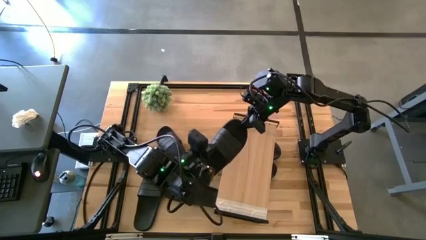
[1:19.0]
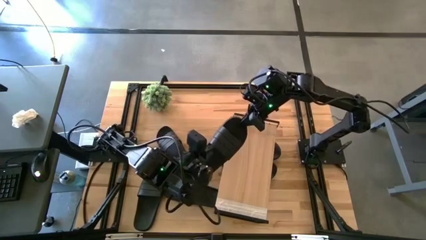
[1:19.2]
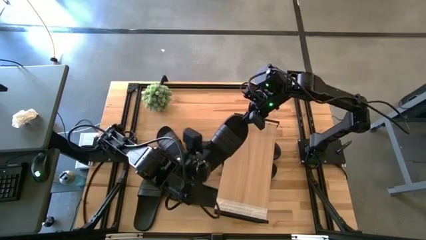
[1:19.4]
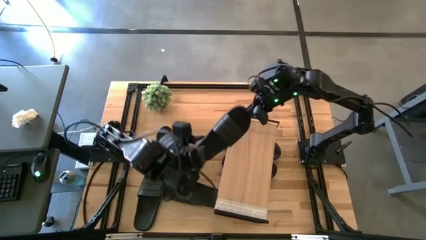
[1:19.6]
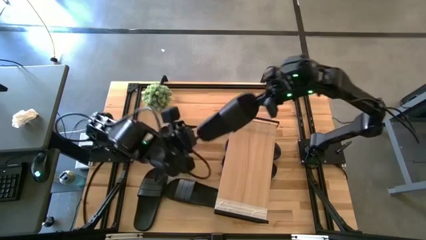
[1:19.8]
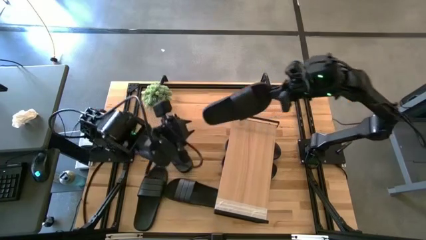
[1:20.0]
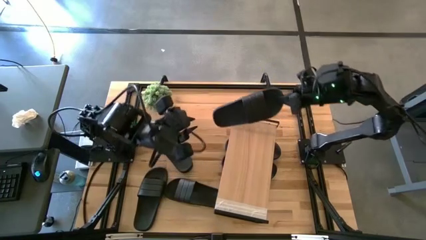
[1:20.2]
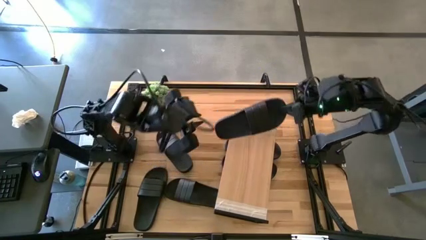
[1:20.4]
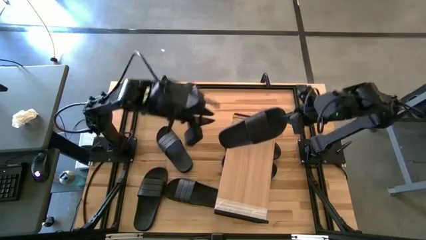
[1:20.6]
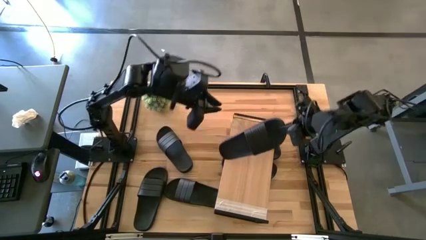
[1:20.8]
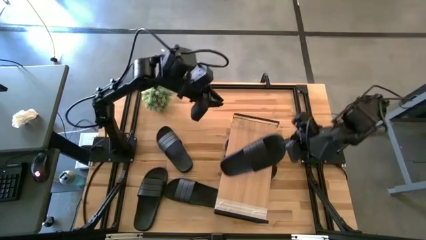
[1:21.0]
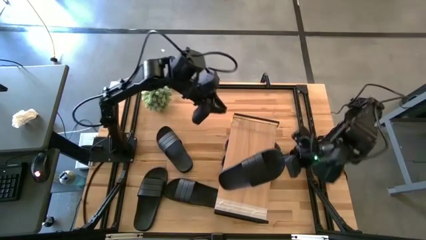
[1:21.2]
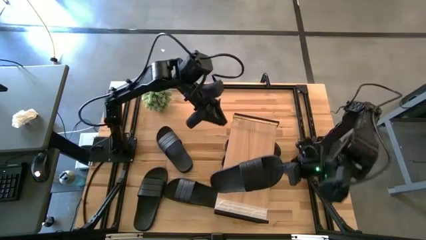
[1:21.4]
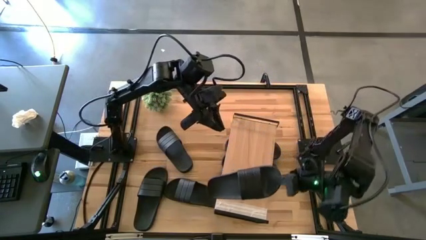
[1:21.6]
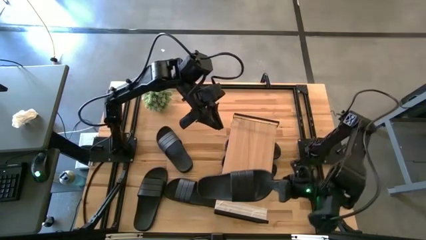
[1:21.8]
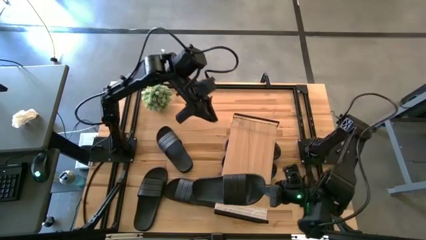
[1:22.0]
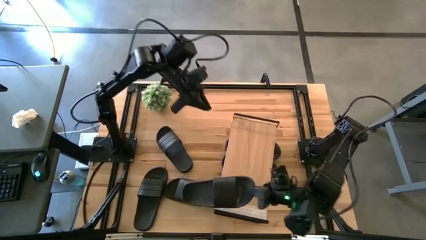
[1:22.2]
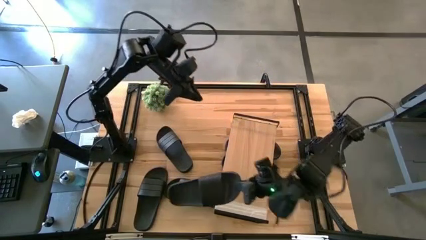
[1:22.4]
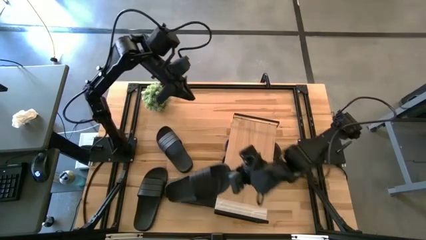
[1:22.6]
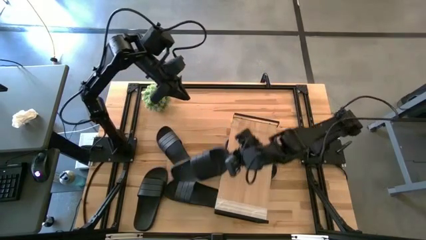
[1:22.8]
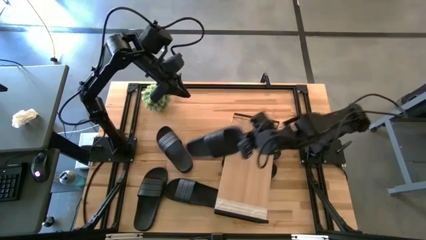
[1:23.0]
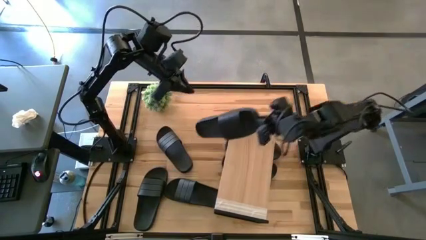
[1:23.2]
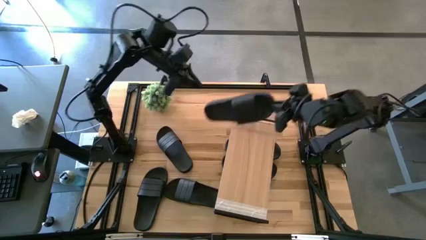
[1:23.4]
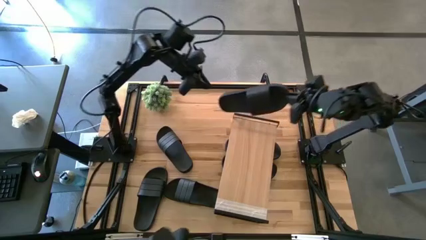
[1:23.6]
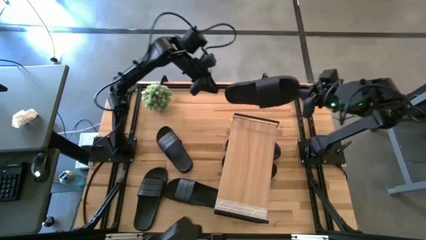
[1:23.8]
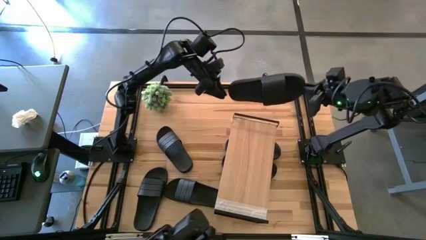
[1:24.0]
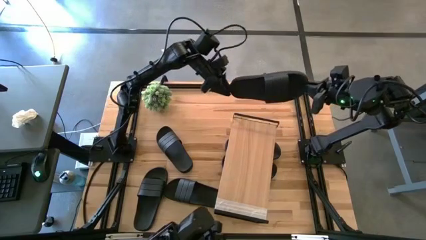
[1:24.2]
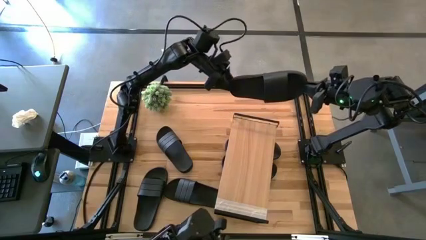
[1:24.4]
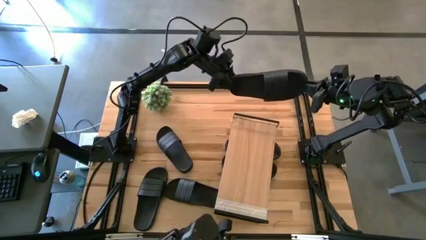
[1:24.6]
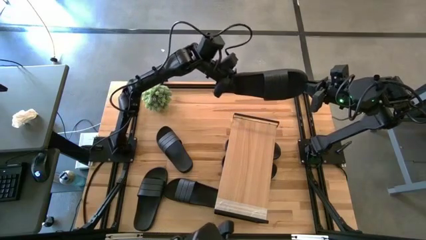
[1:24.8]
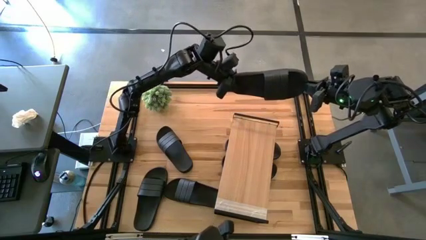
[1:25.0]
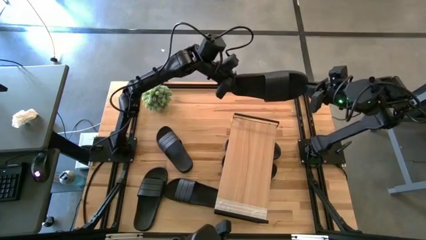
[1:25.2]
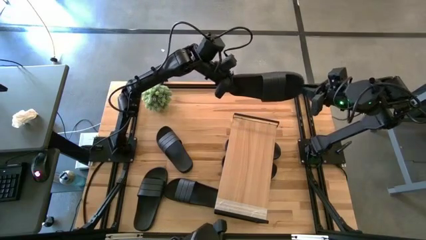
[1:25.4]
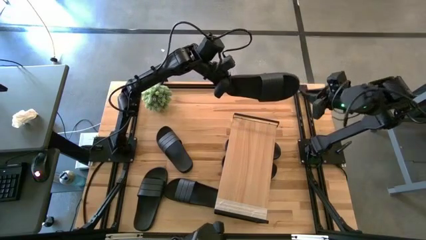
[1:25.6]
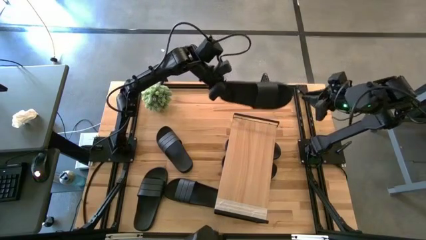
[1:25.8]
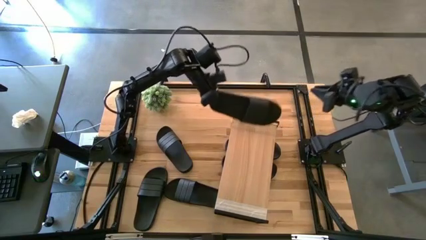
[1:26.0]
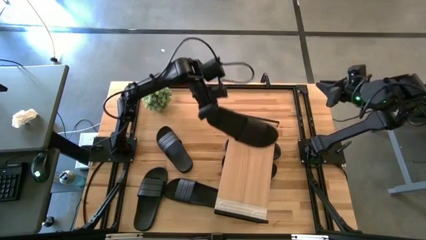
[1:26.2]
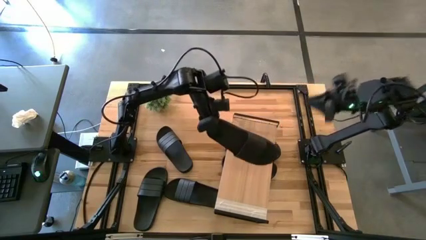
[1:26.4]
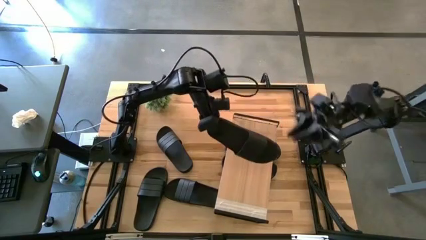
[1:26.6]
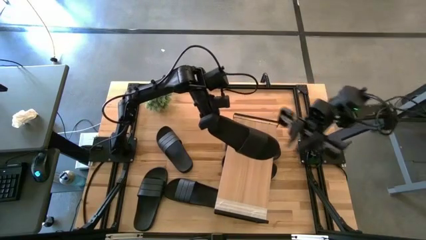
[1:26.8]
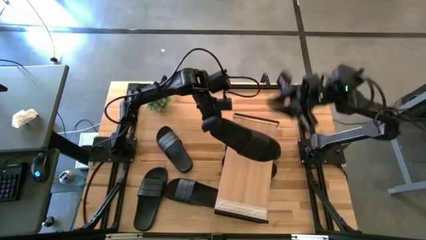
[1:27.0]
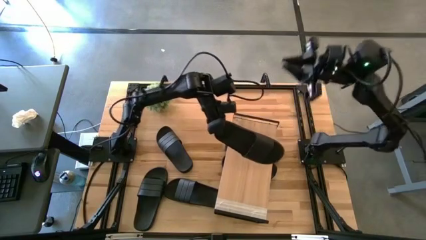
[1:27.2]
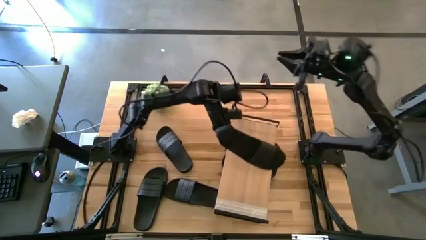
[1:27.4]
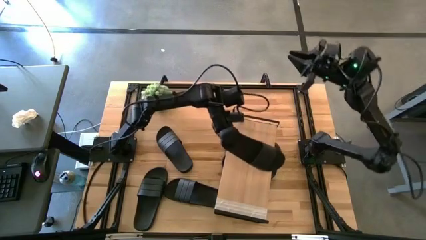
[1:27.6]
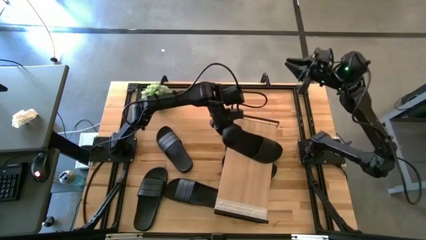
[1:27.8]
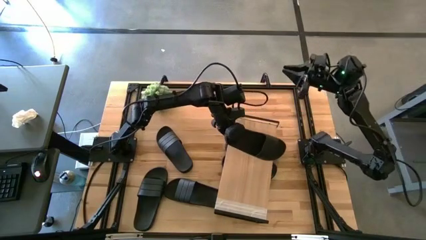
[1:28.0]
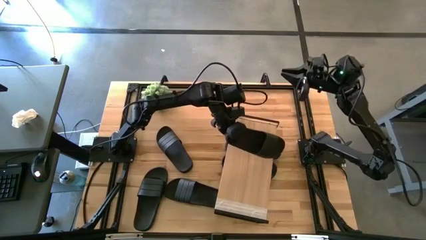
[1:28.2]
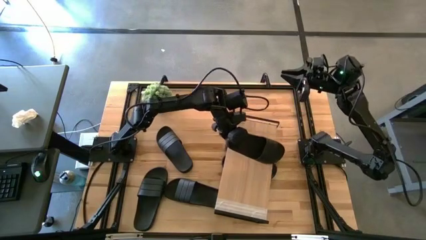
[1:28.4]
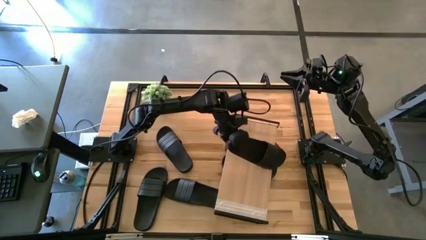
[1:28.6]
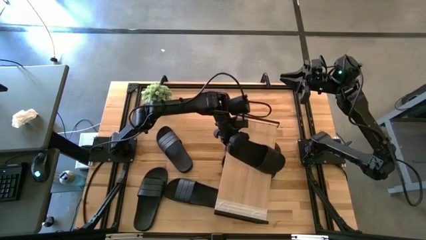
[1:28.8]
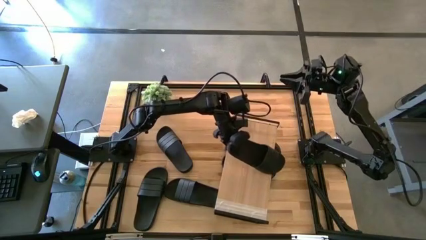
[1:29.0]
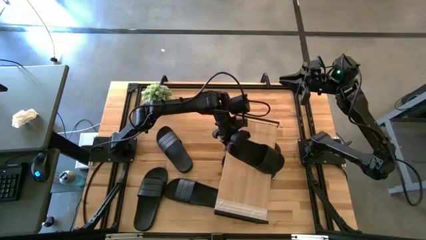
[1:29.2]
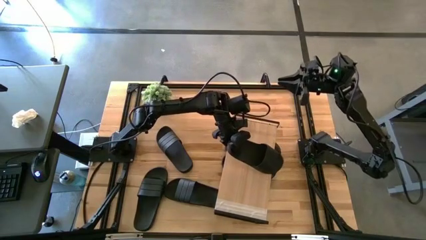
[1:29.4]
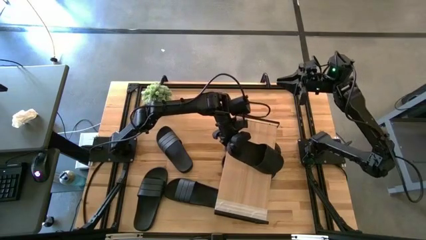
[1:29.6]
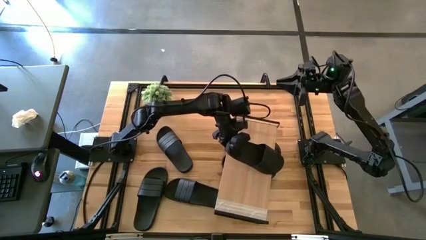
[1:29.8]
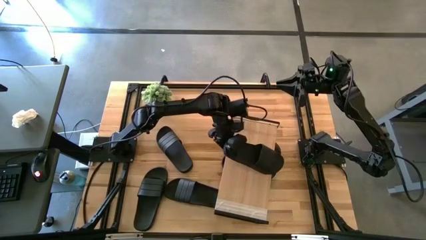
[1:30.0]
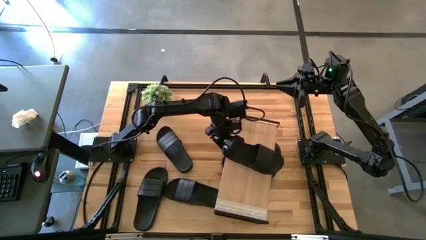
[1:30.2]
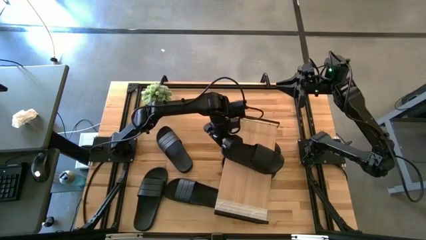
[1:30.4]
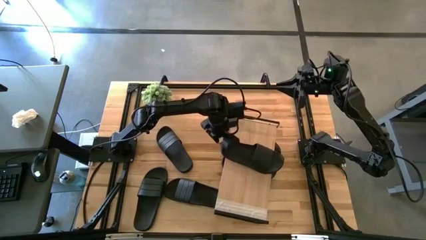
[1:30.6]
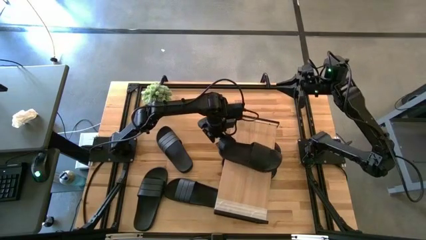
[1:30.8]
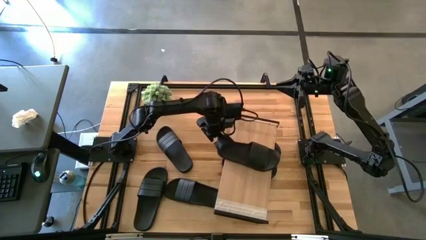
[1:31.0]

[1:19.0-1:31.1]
Task: Pick and place slides into the shelf
Put the black slide on the shelf

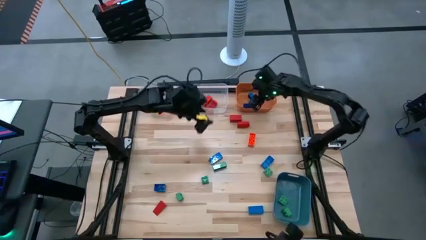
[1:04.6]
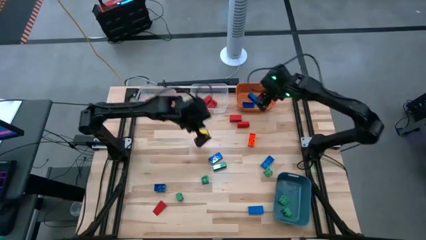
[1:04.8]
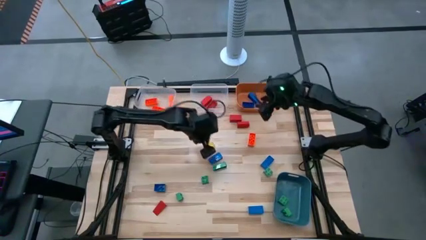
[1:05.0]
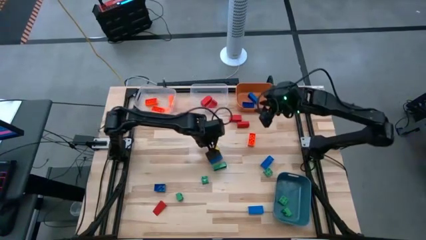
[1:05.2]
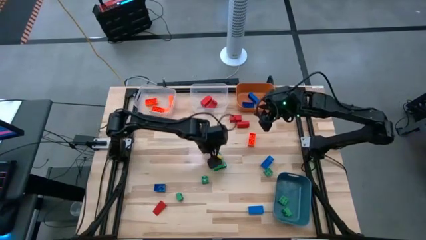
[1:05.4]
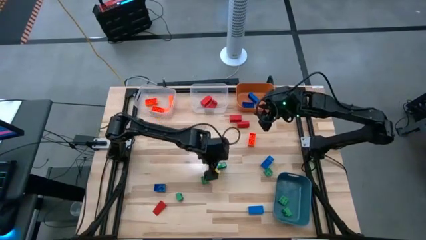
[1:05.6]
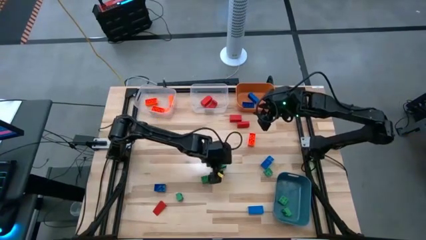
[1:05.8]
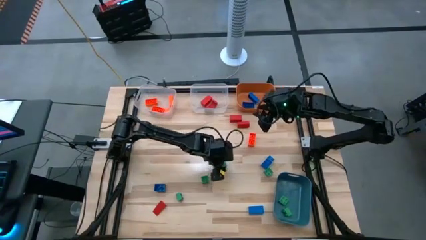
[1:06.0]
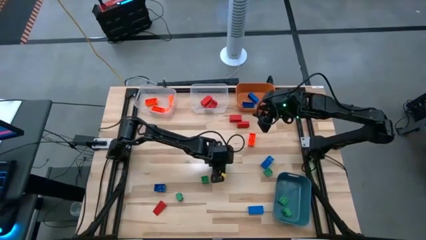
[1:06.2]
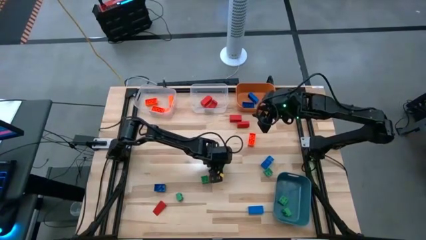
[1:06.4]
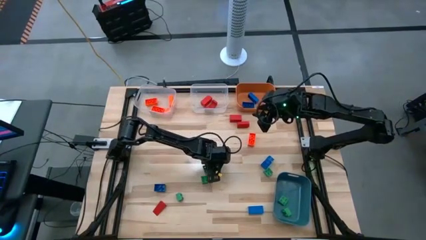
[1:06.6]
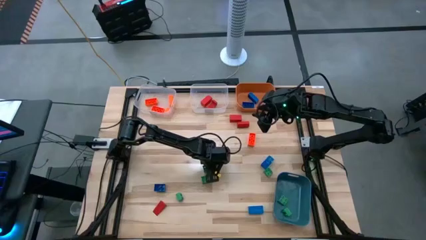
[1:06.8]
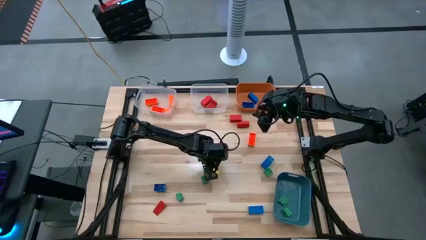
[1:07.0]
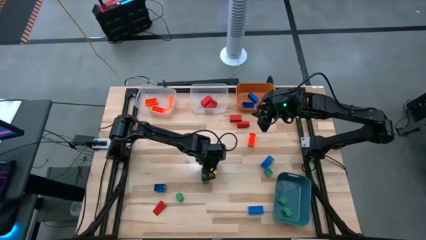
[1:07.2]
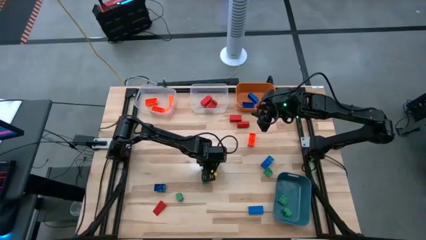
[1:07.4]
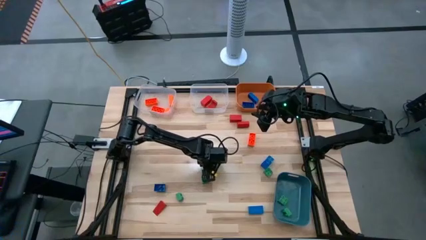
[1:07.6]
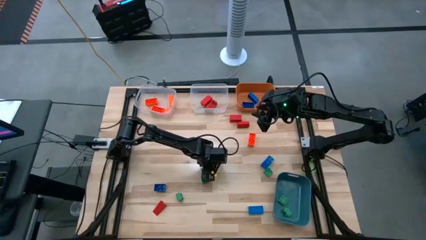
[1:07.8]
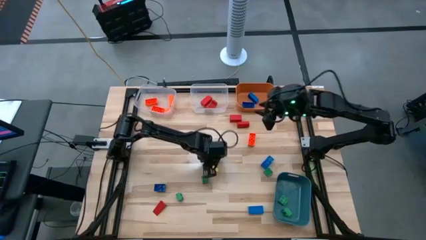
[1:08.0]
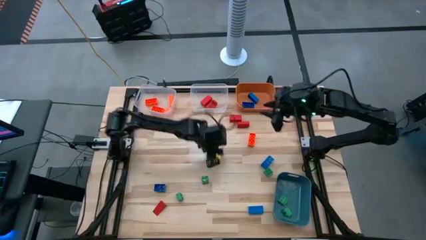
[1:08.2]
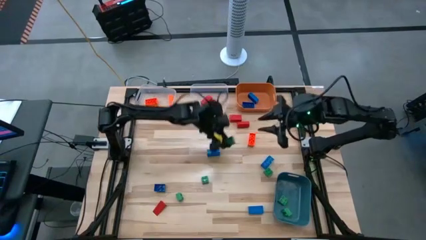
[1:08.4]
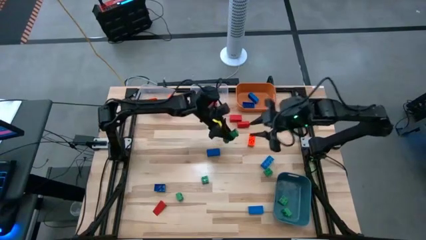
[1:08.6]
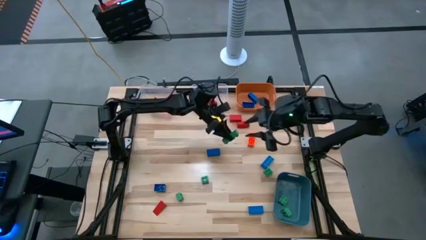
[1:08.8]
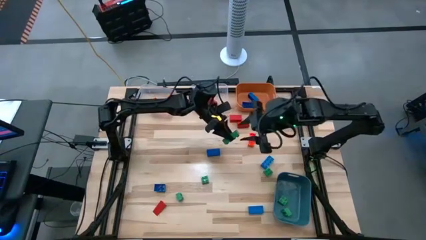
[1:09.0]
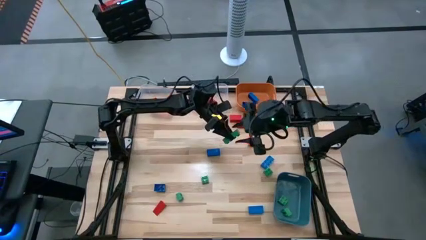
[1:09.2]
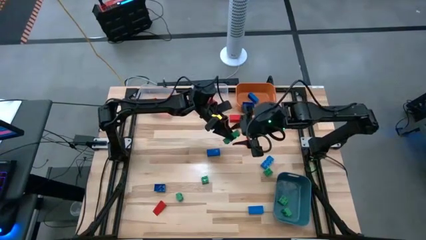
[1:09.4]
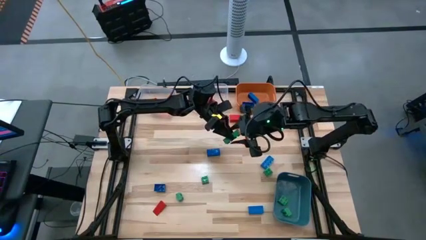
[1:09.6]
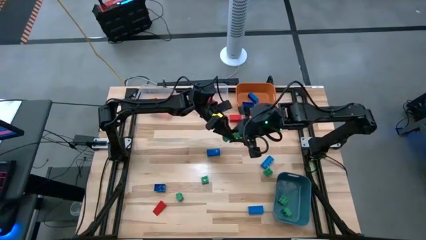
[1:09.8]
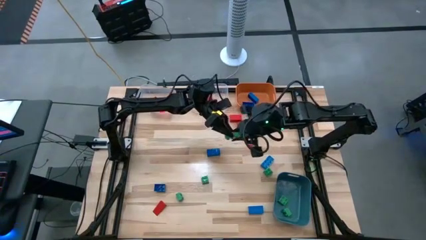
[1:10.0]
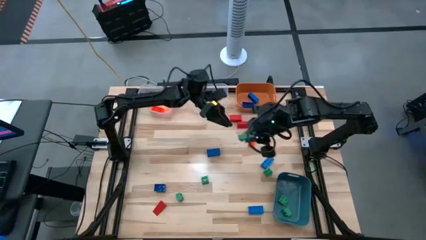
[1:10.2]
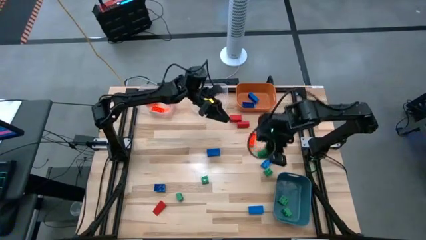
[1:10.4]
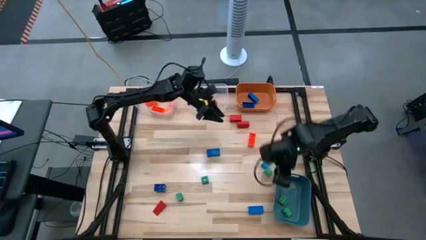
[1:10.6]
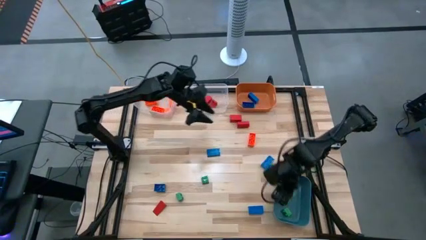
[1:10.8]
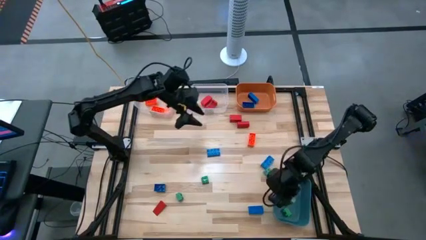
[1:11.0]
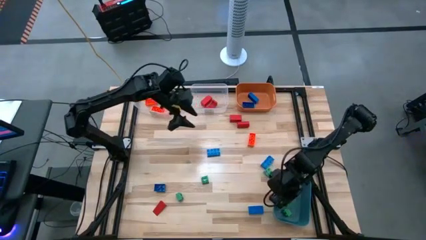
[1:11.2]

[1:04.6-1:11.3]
Task: Sort blocks
Put the green game piece into the blue bin
